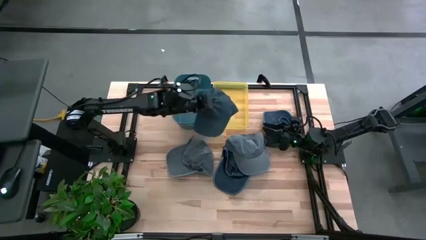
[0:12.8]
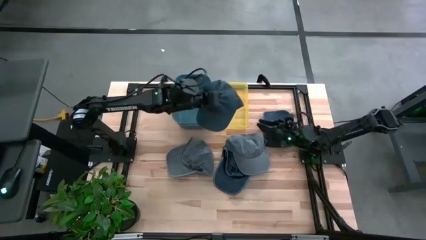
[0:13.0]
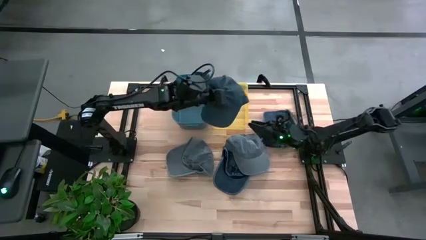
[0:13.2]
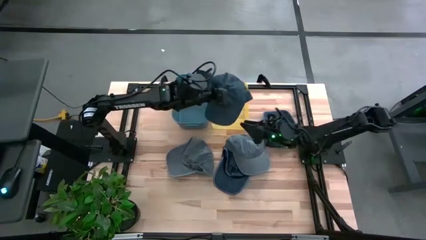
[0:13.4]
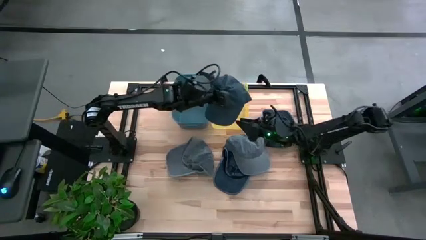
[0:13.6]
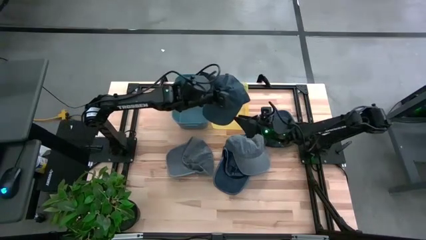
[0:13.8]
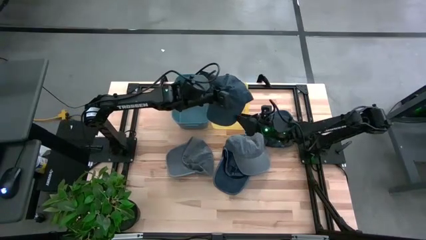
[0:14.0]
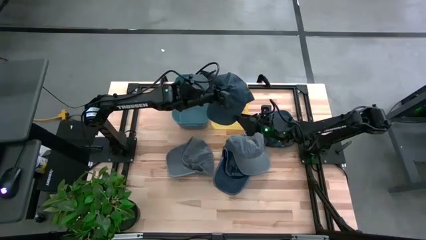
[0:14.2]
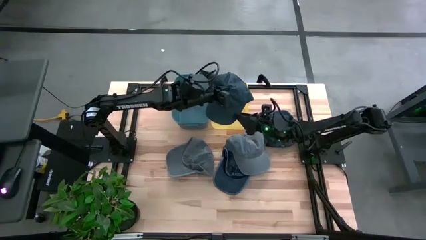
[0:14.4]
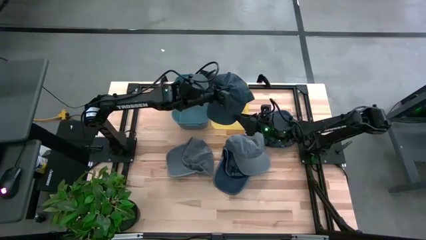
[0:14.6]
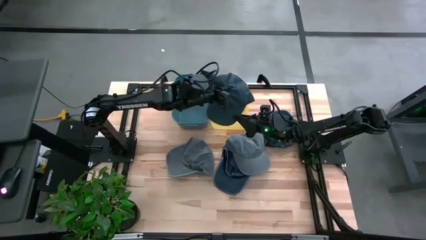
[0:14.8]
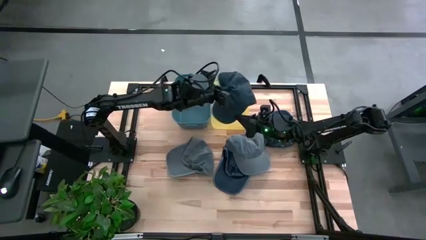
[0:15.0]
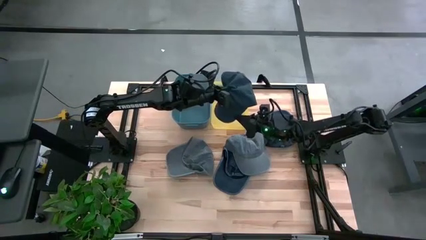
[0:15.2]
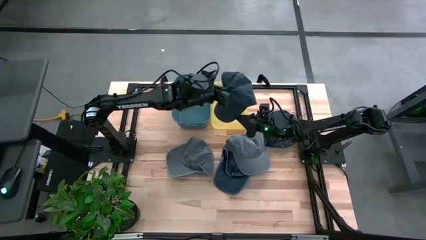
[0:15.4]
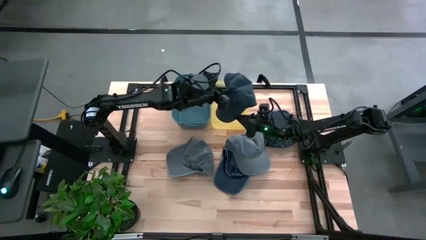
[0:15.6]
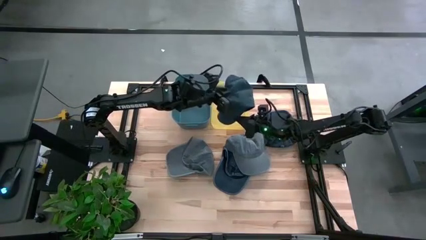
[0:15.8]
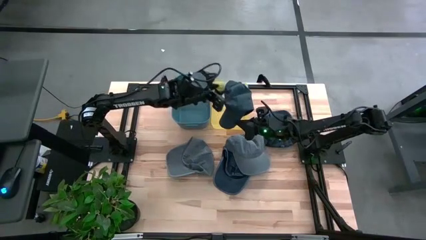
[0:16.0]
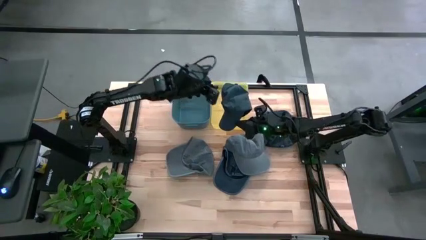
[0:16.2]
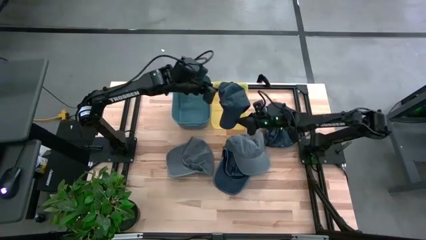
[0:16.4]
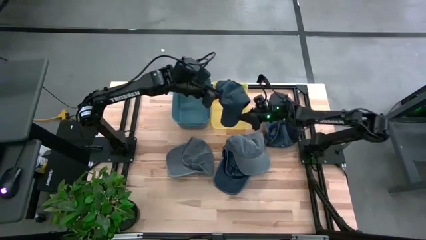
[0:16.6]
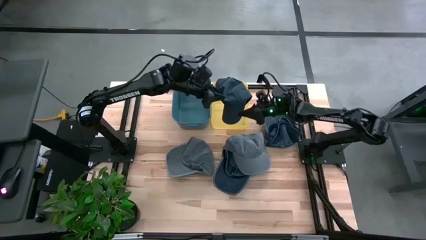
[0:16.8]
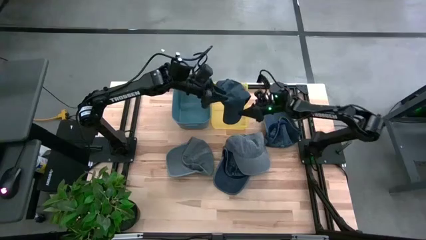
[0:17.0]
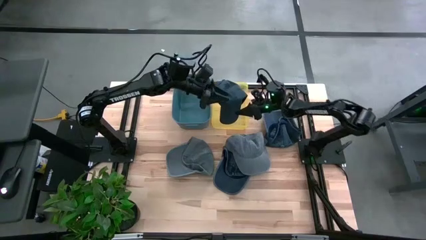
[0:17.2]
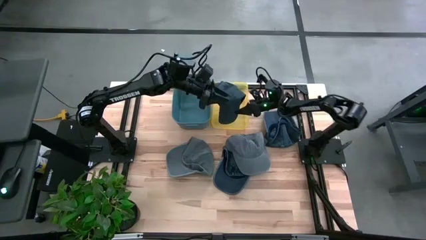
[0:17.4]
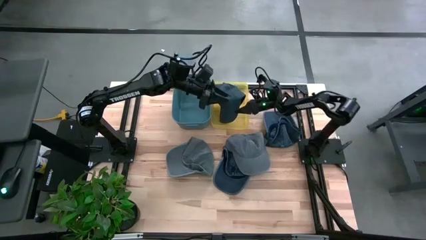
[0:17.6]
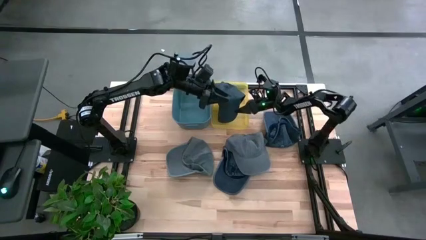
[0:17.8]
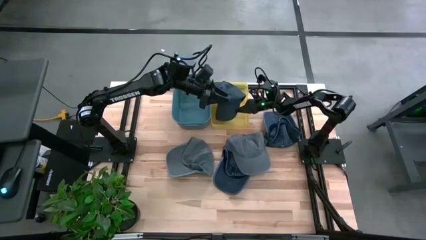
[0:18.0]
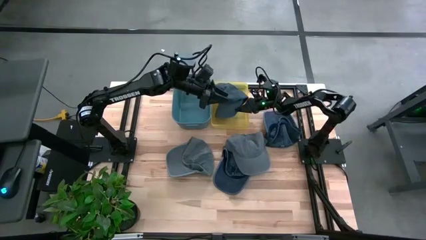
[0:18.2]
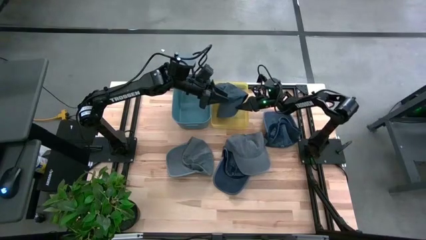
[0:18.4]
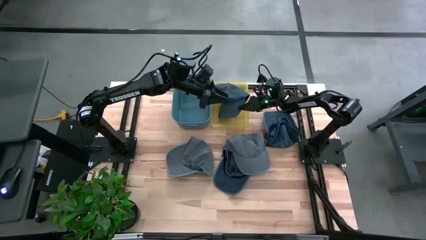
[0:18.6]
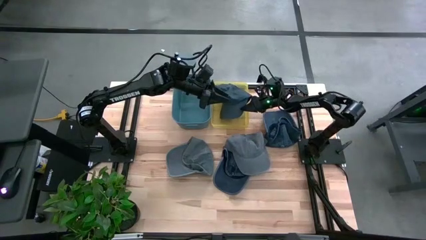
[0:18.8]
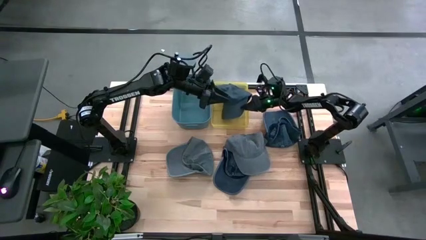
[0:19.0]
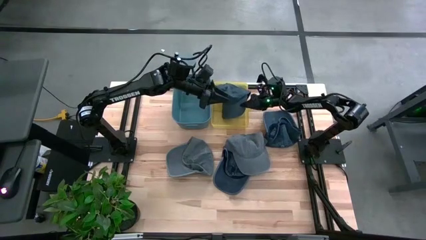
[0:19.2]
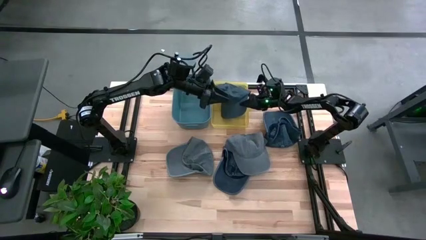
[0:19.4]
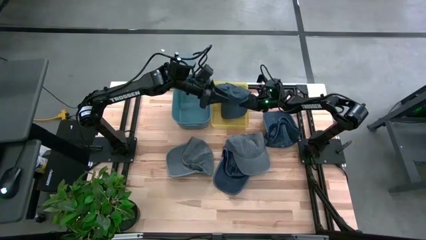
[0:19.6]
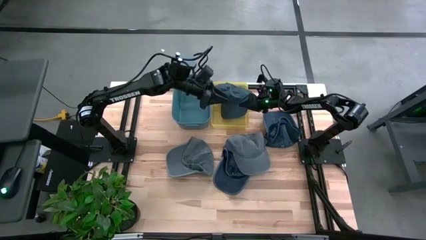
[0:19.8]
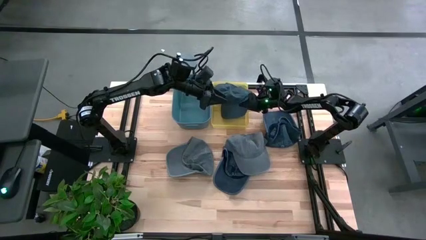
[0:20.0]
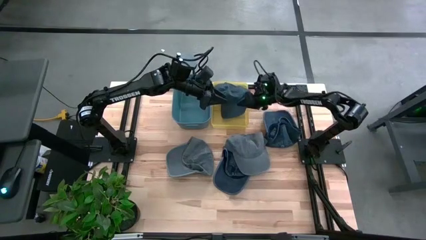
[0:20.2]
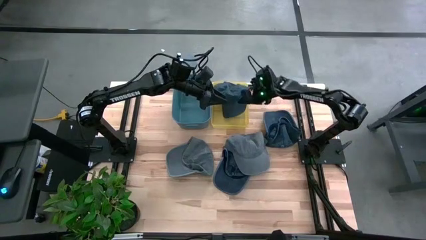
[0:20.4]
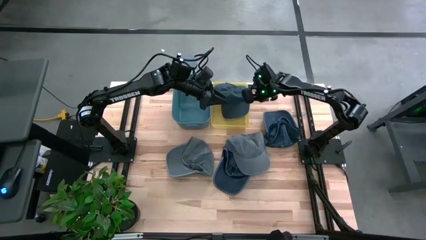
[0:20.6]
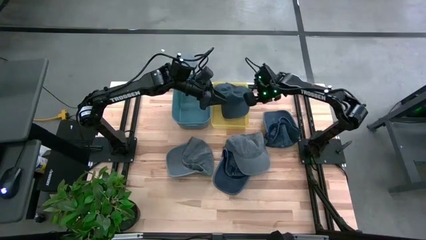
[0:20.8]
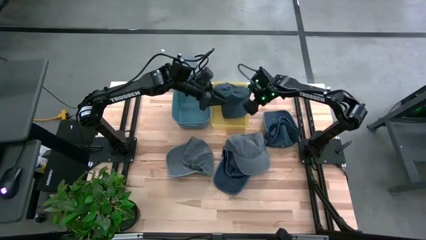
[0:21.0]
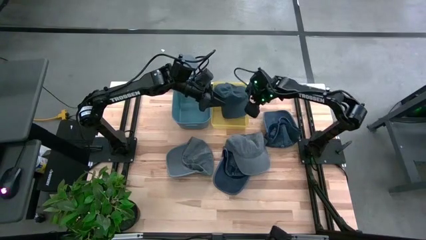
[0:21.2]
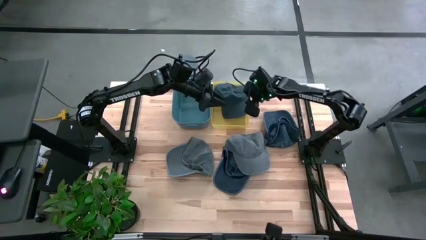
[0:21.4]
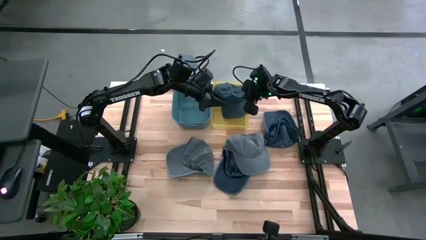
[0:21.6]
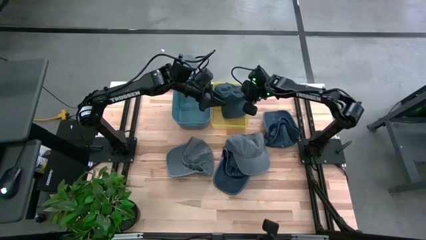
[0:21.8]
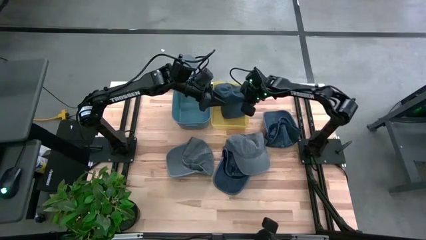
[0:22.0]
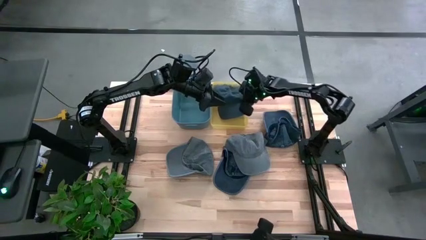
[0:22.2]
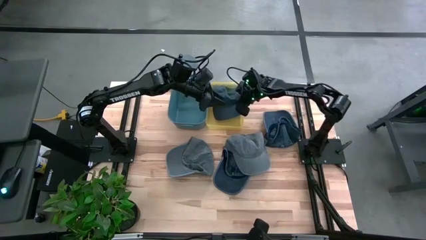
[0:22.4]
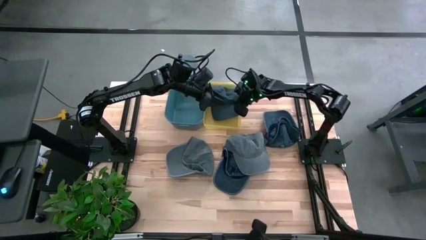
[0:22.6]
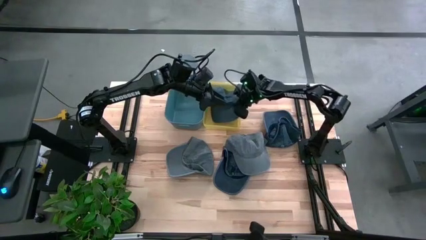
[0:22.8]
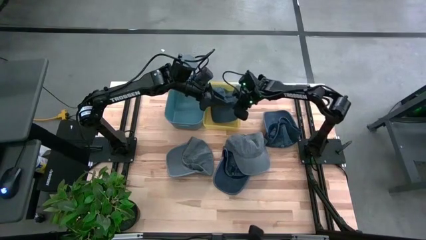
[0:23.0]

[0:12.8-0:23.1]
Task: Pick & Place hat
Put the left blue cap into the yellow bin
